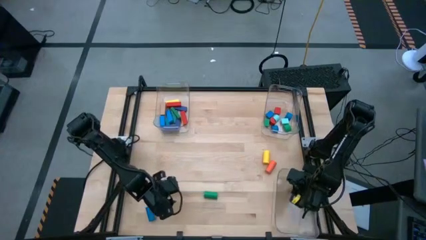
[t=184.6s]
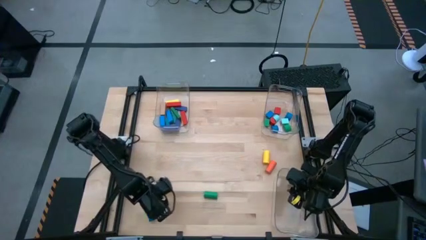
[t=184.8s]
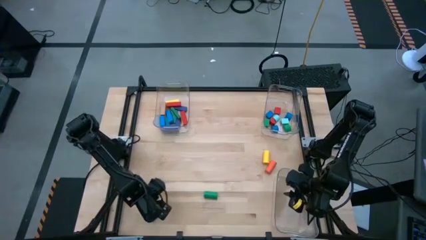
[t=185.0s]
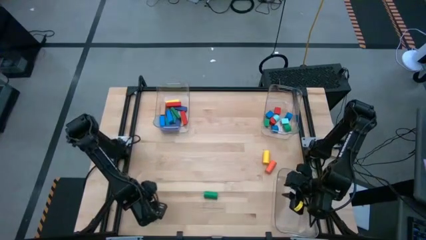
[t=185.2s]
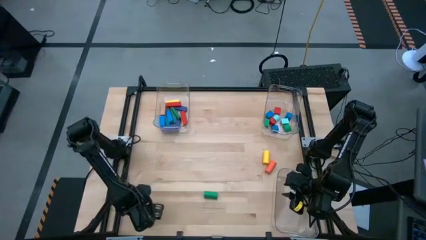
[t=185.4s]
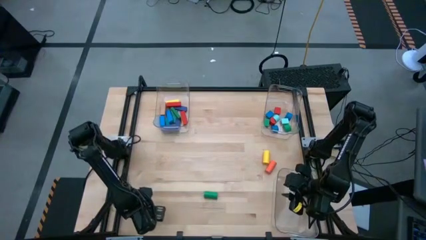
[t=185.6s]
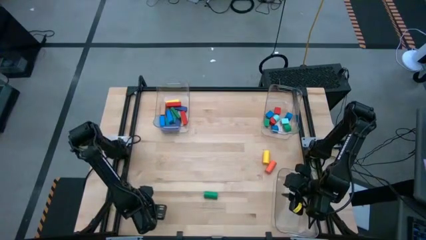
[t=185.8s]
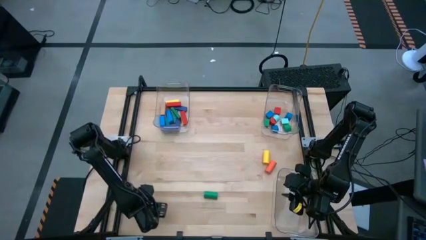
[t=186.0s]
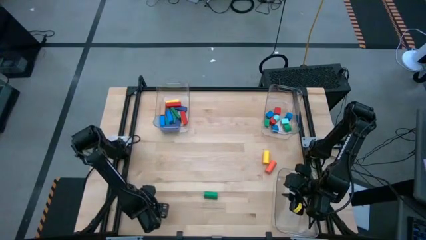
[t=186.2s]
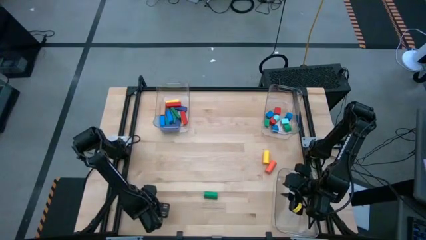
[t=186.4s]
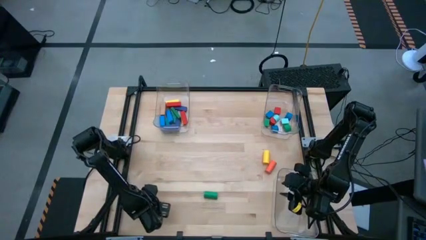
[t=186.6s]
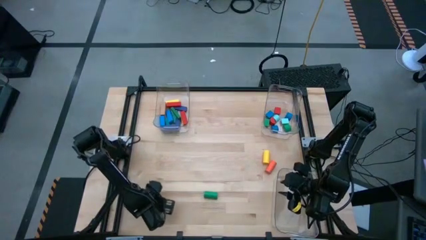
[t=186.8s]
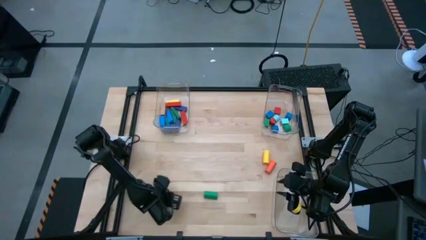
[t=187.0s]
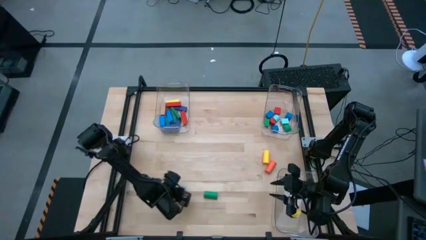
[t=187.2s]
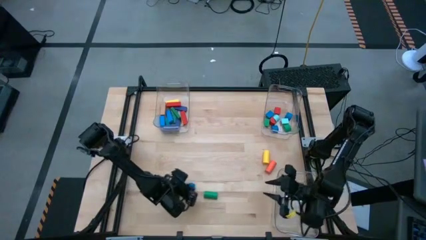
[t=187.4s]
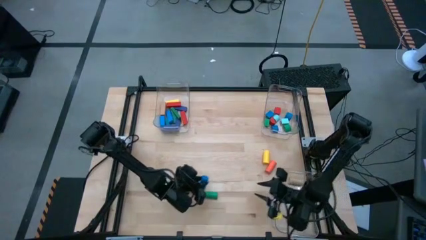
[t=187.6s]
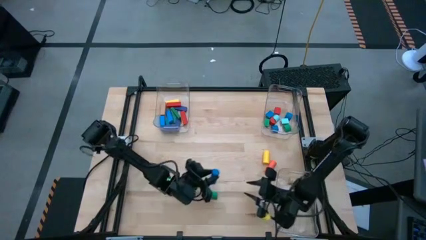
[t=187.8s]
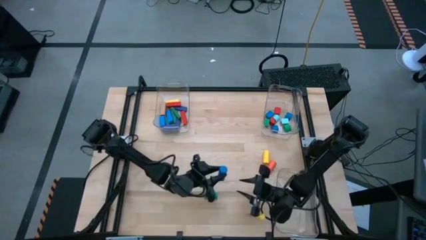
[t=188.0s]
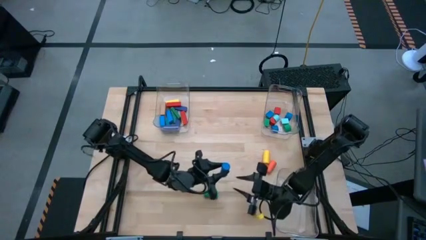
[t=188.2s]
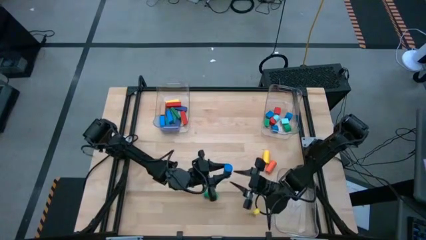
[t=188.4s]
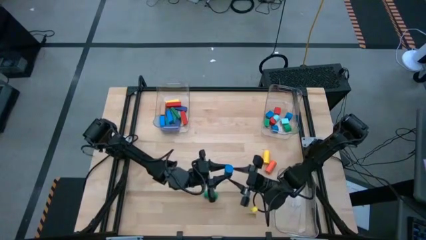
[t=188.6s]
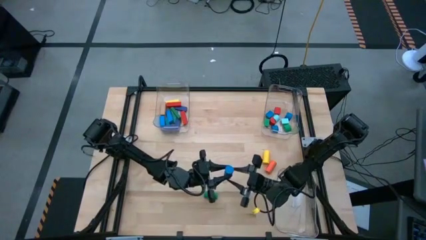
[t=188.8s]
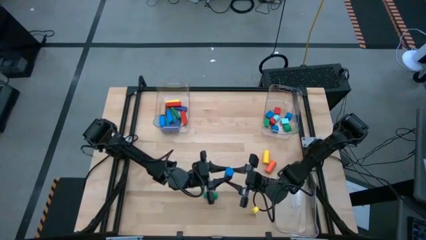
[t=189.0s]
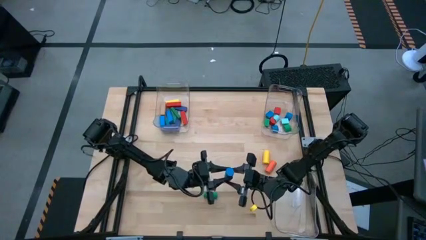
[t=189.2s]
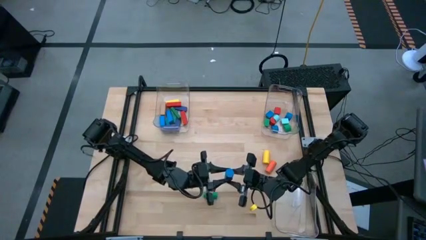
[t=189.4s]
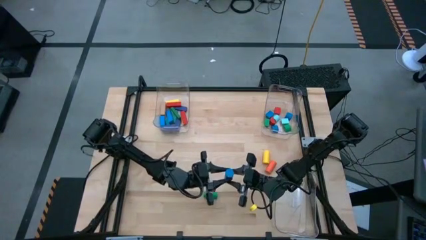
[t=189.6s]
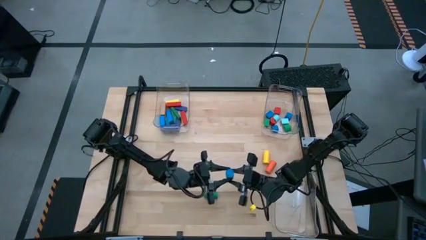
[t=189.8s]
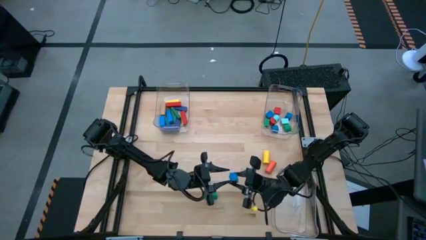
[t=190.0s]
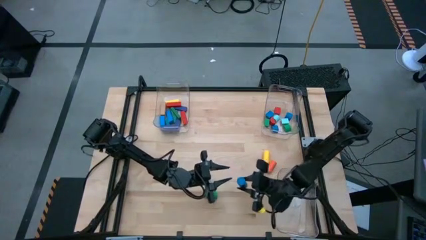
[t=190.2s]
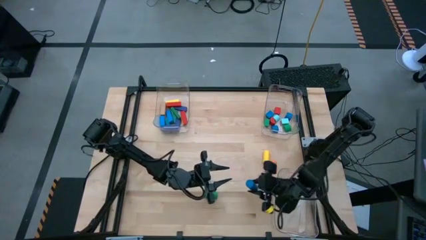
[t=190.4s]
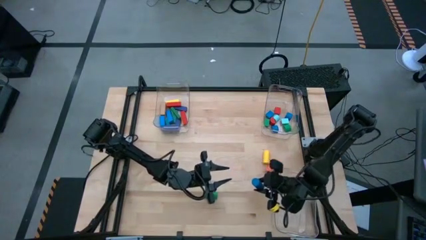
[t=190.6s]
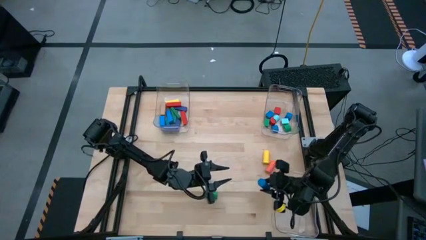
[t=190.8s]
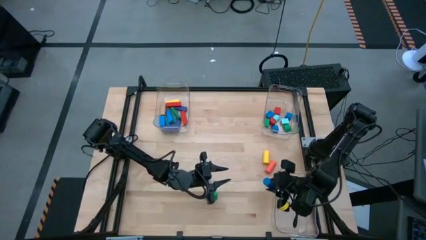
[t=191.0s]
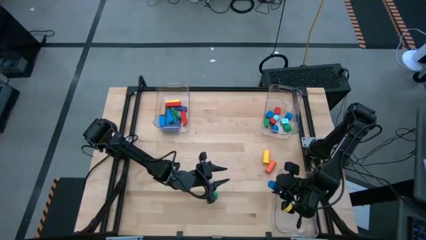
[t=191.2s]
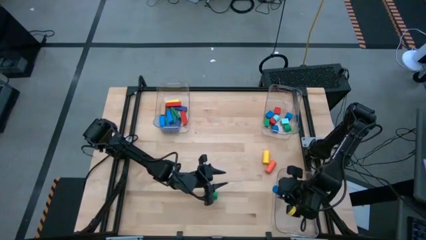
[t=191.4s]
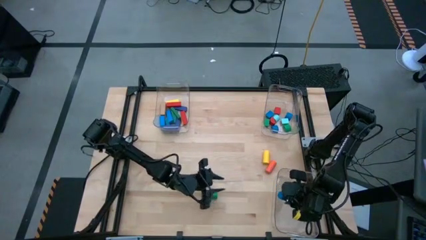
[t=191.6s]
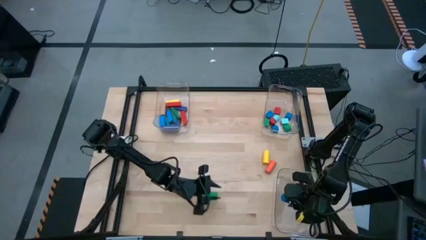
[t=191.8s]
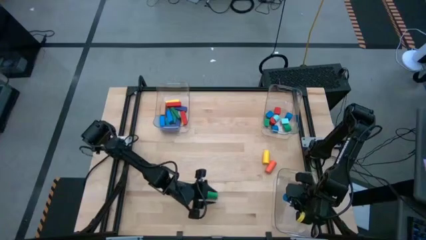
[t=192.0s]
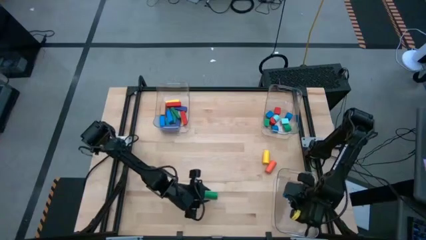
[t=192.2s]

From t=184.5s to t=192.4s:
Task: Sort blocks by size
Put the blue cylindrical block into the bottom transparent bin

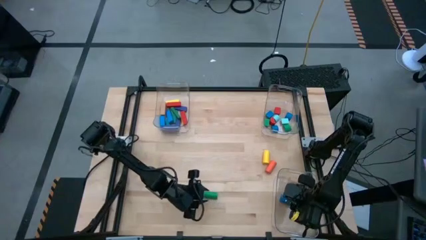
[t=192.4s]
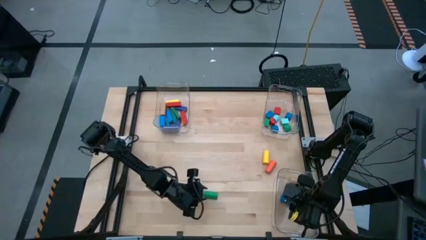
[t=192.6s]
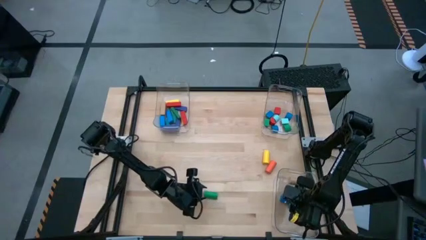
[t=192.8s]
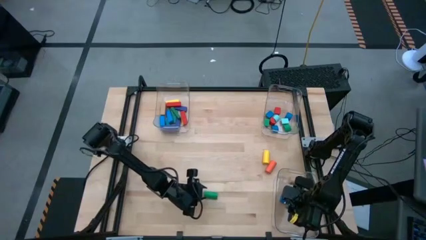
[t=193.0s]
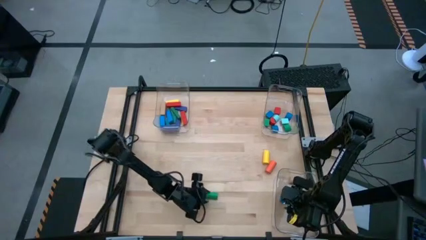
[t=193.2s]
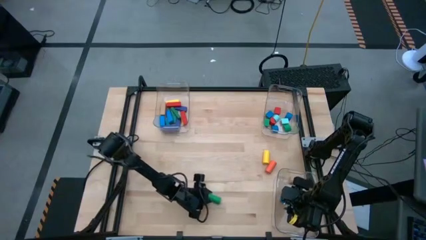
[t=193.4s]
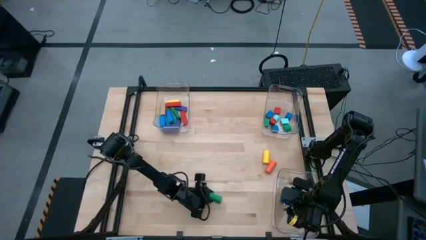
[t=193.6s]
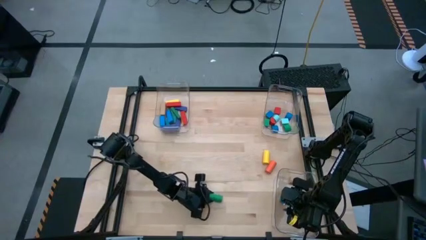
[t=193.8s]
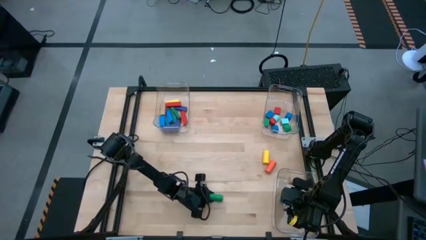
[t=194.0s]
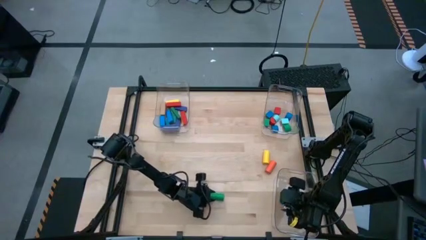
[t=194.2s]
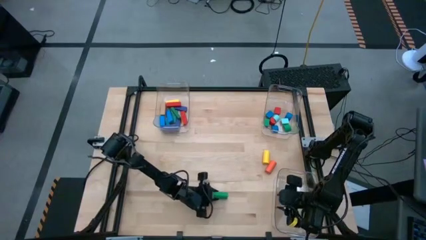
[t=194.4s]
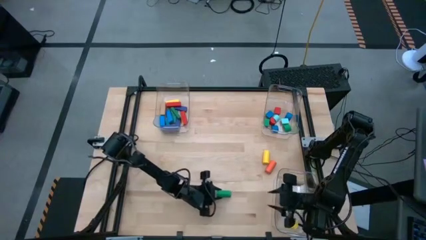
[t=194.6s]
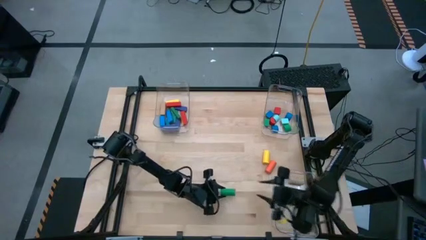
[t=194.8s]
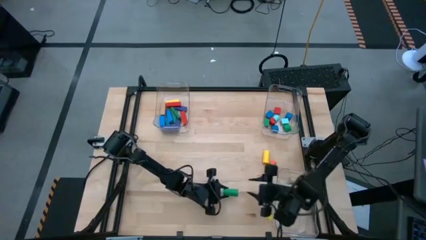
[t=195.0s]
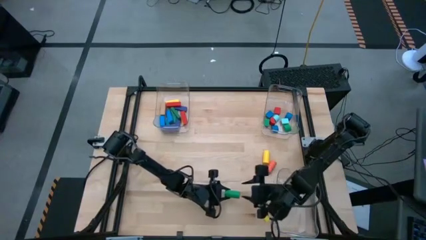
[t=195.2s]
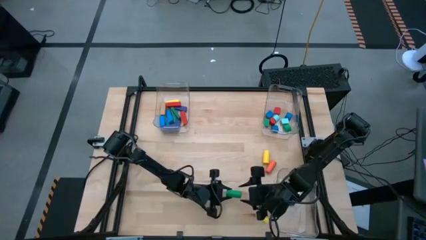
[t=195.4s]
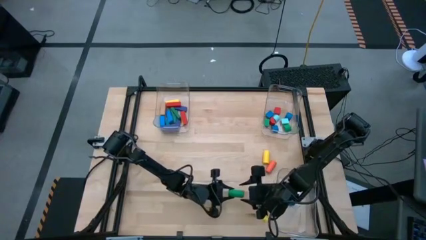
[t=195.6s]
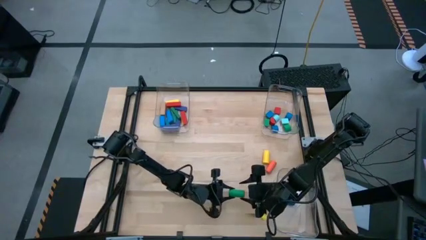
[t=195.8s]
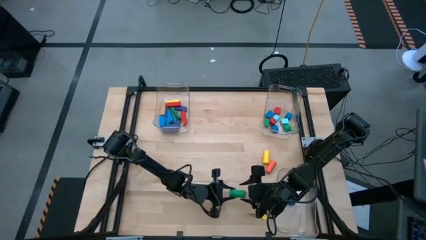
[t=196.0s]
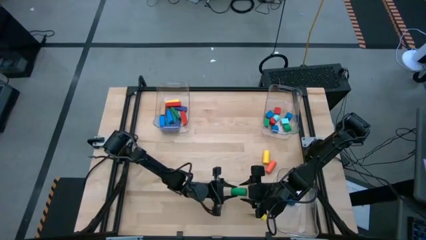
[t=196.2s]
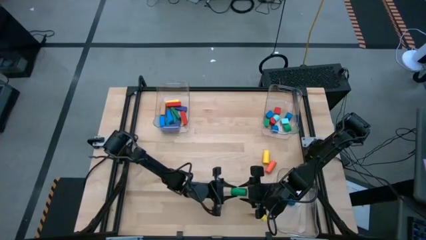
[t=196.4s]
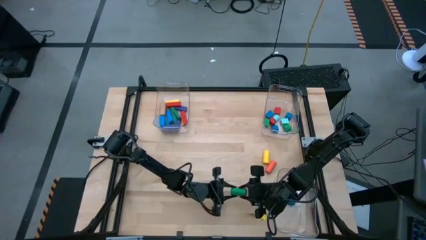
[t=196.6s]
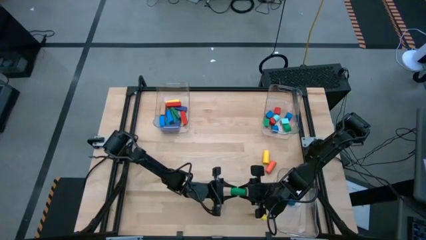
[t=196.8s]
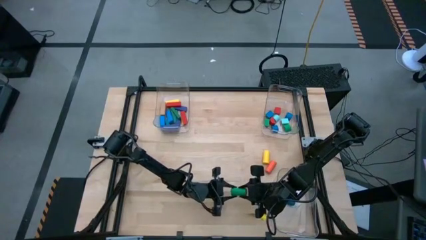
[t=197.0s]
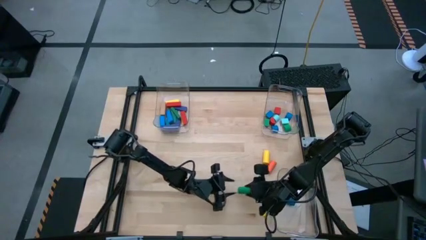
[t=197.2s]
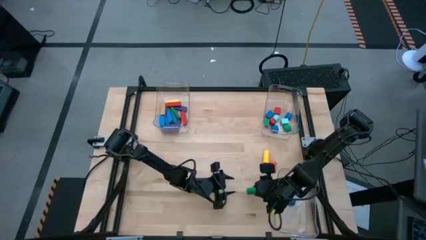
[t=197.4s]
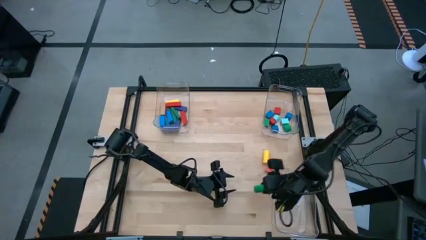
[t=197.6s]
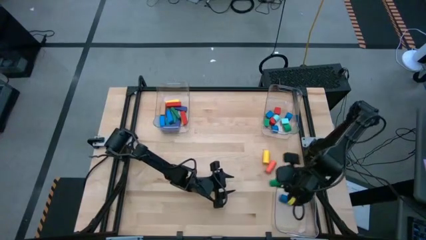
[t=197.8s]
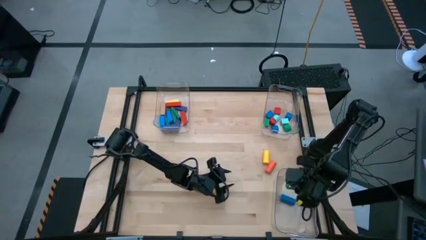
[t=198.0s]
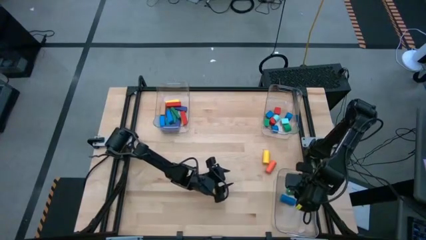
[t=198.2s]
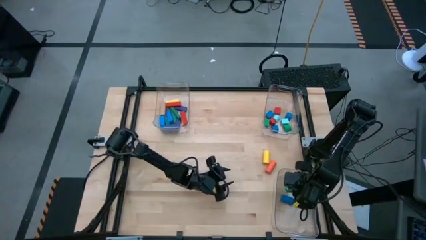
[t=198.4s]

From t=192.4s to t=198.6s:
Put the green cylindrical block into the bottom transparent bin
